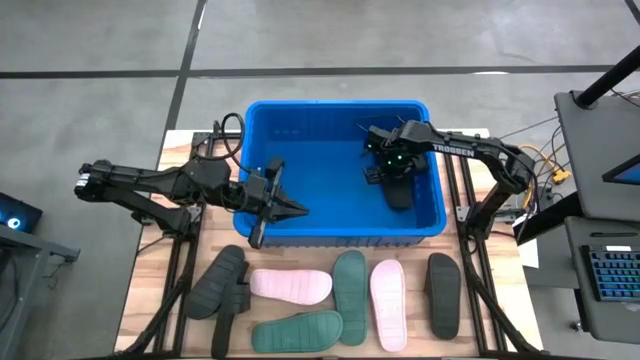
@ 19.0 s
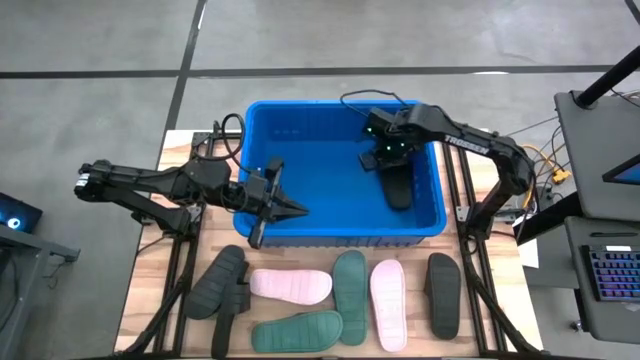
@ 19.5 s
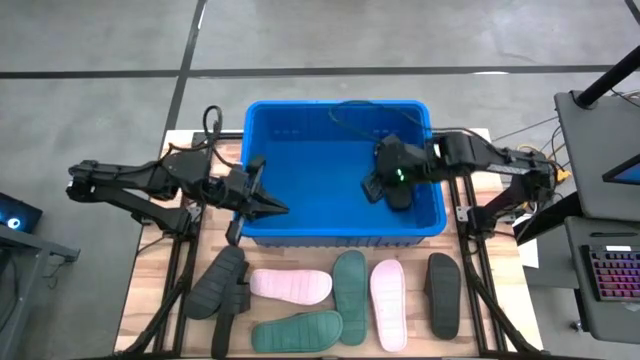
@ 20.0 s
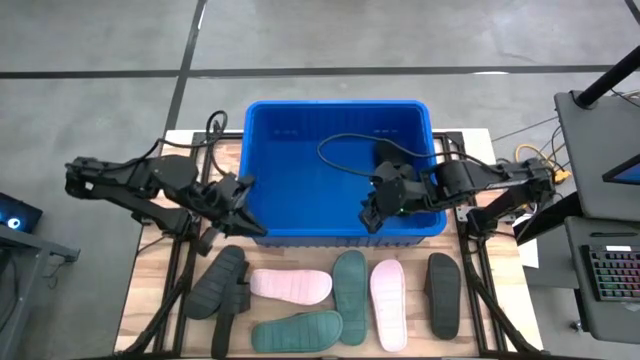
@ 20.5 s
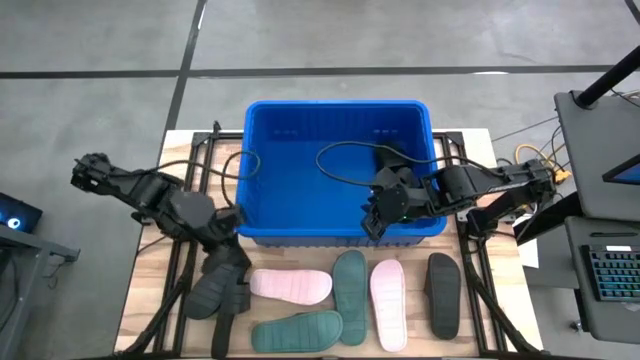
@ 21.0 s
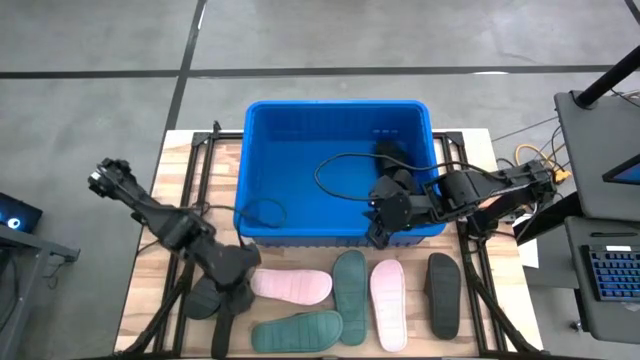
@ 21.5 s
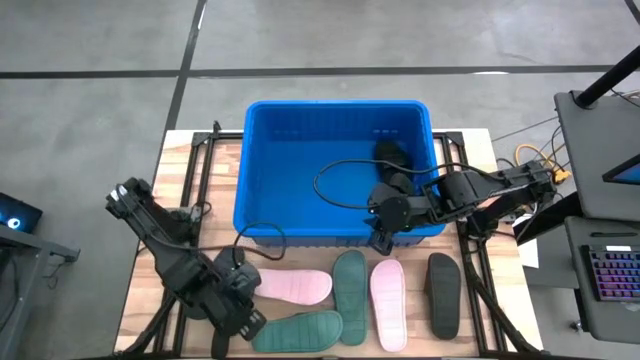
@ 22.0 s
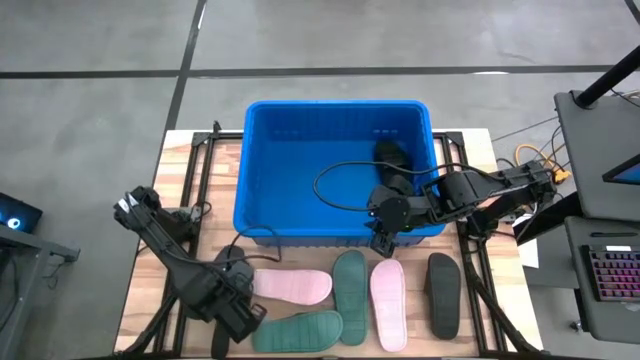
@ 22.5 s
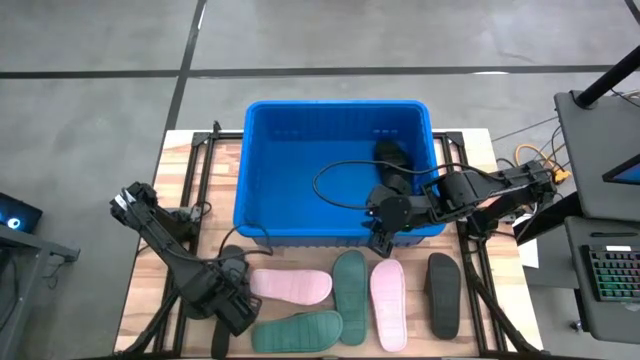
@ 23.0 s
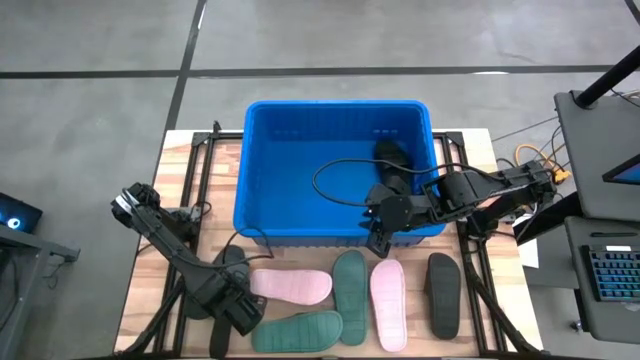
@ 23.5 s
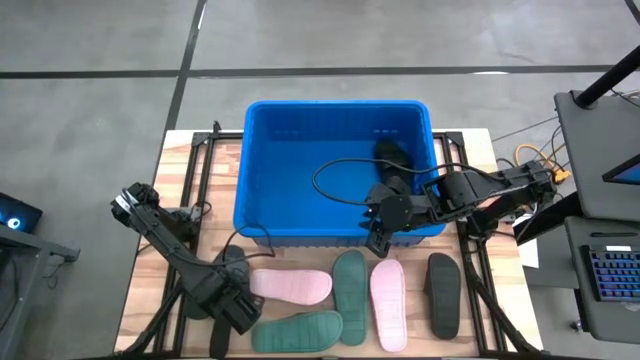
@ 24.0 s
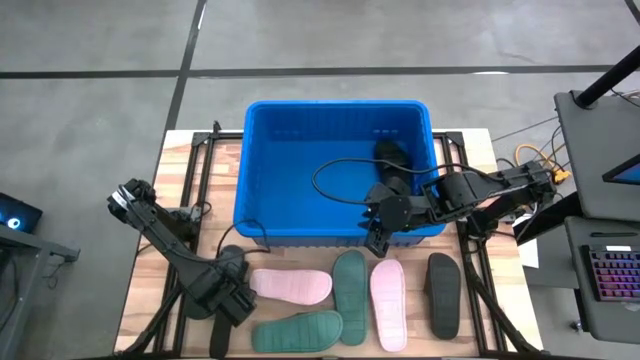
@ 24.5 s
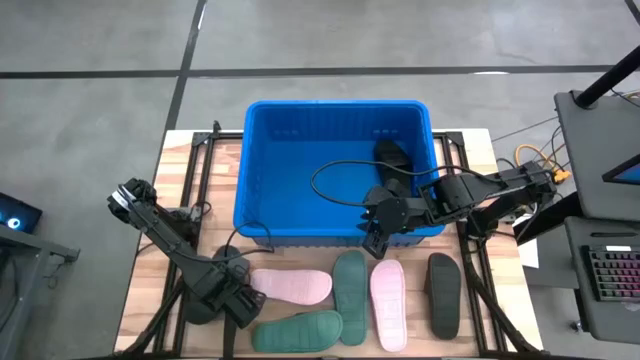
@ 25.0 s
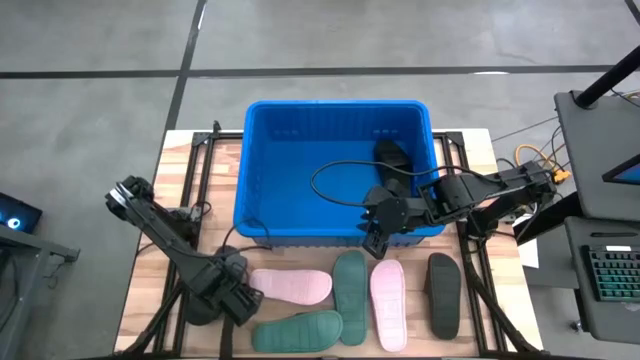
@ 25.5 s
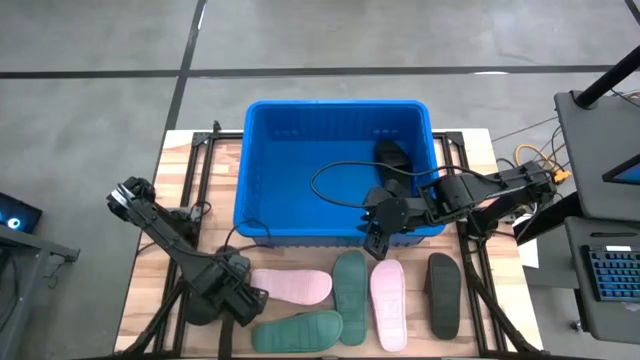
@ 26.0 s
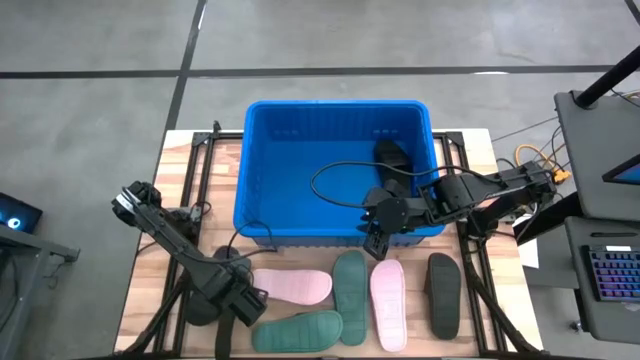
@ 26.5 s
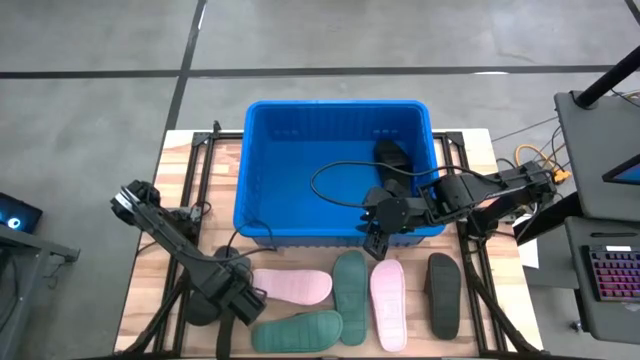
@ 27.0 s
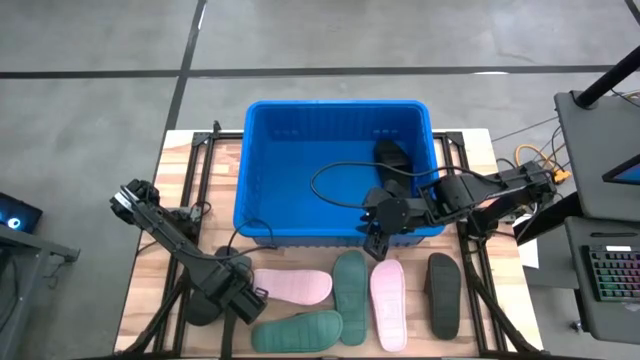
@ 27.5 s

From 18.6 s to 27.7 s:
Task: Pick and place slides into bin
Put the black slide into the bin

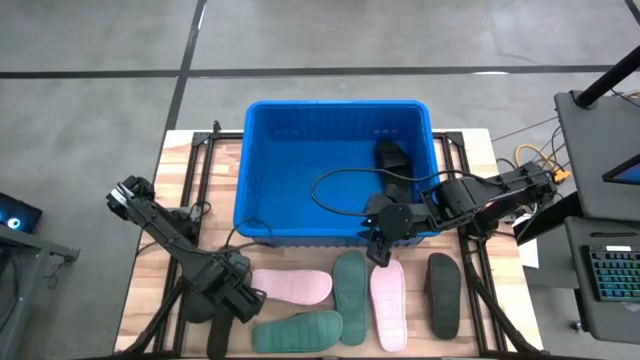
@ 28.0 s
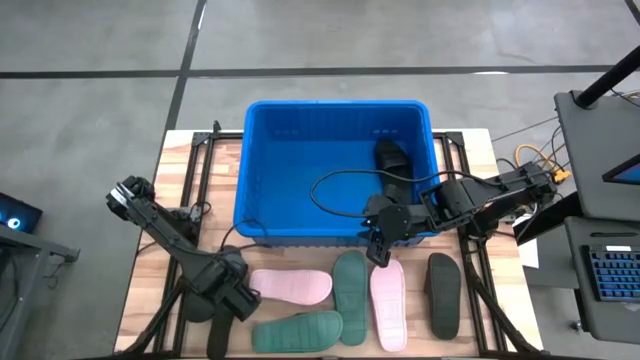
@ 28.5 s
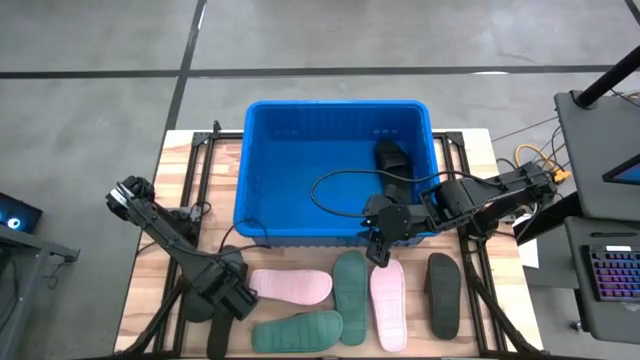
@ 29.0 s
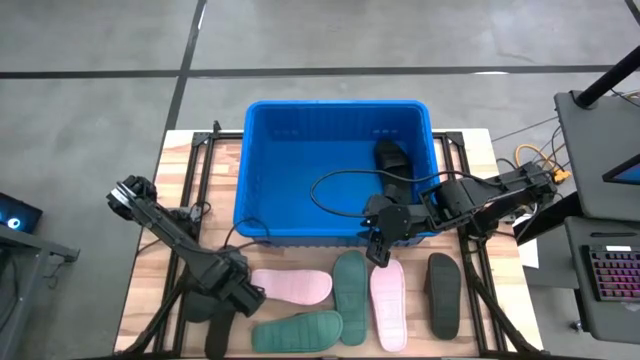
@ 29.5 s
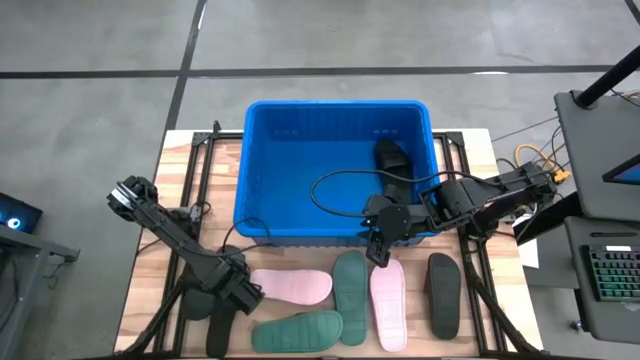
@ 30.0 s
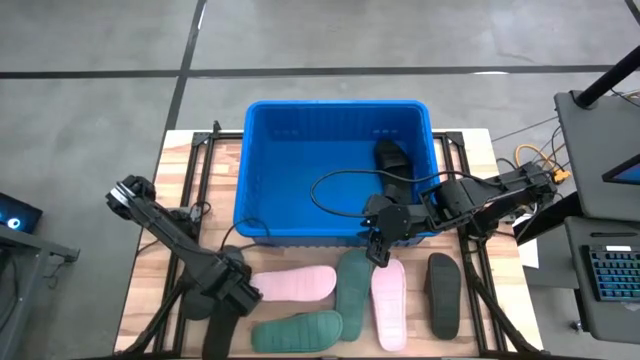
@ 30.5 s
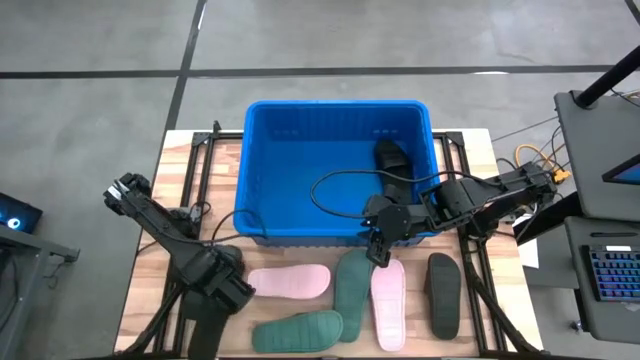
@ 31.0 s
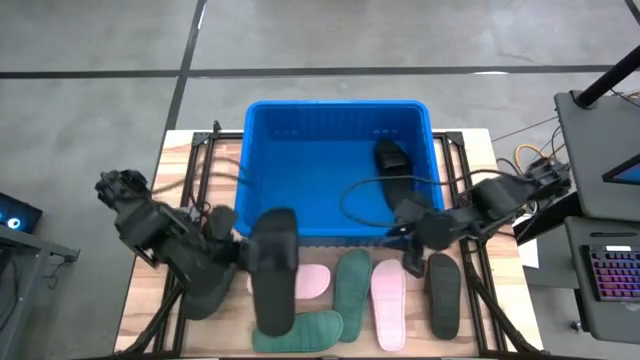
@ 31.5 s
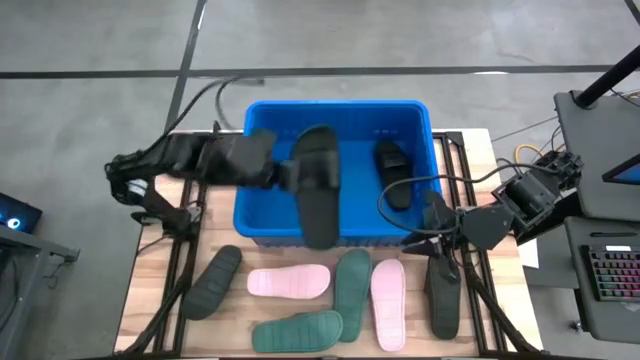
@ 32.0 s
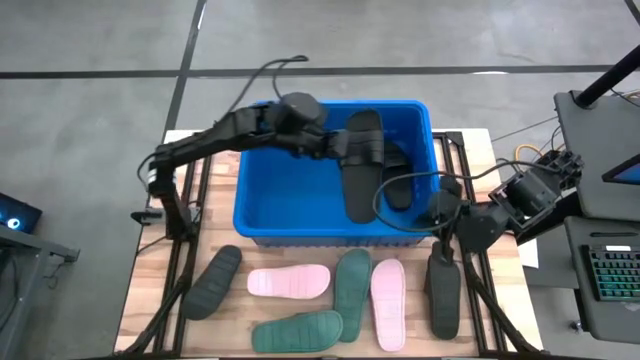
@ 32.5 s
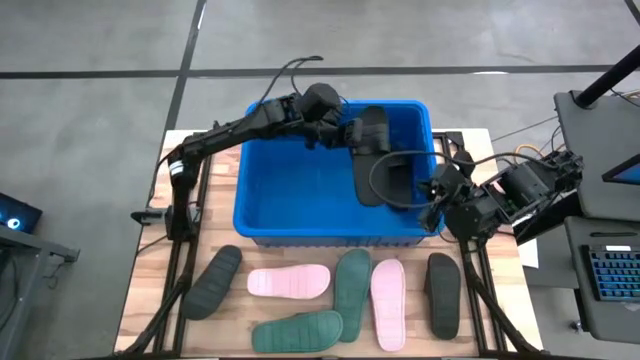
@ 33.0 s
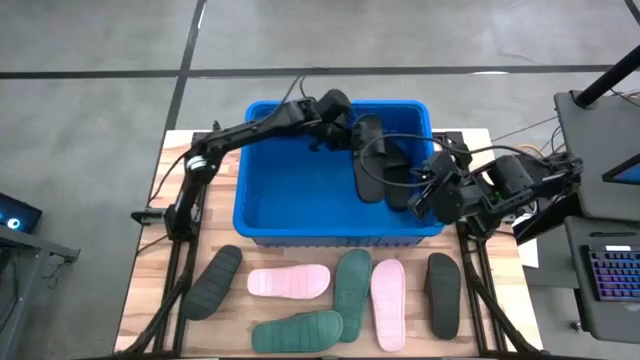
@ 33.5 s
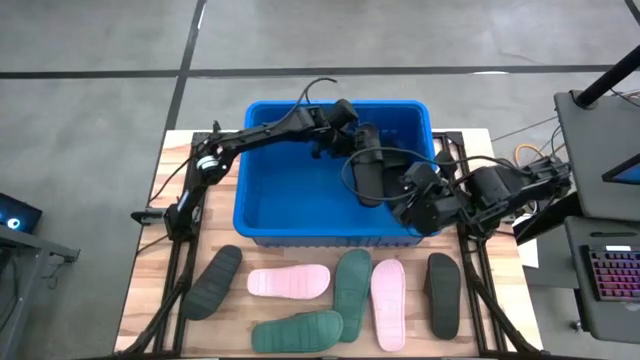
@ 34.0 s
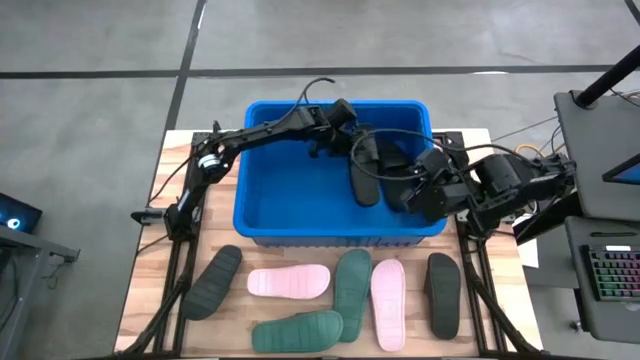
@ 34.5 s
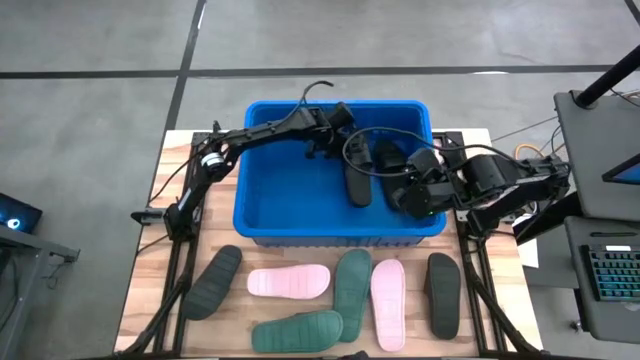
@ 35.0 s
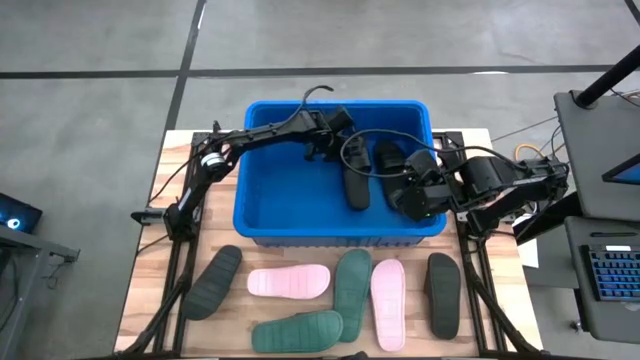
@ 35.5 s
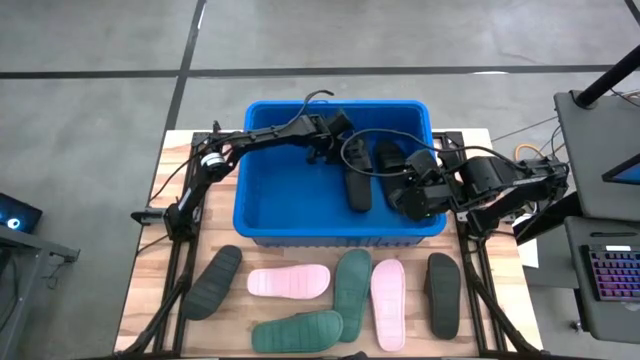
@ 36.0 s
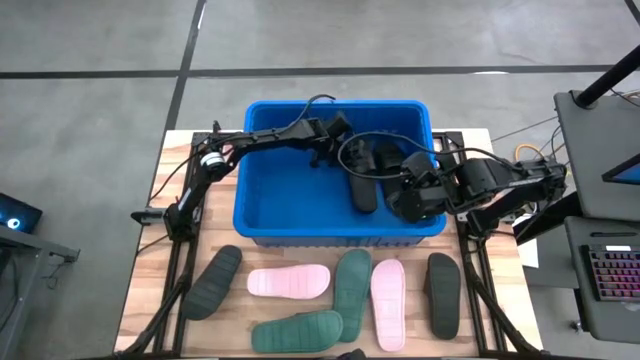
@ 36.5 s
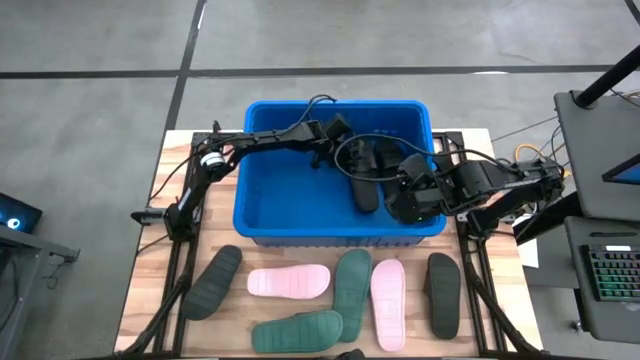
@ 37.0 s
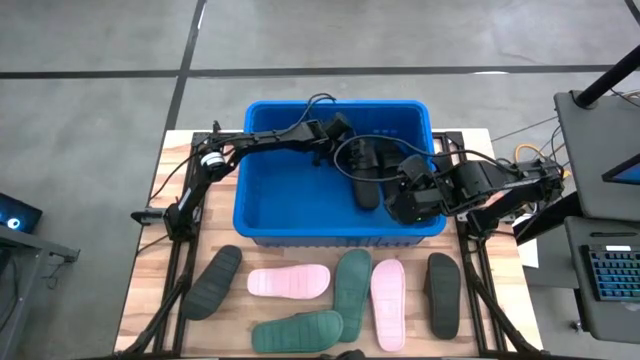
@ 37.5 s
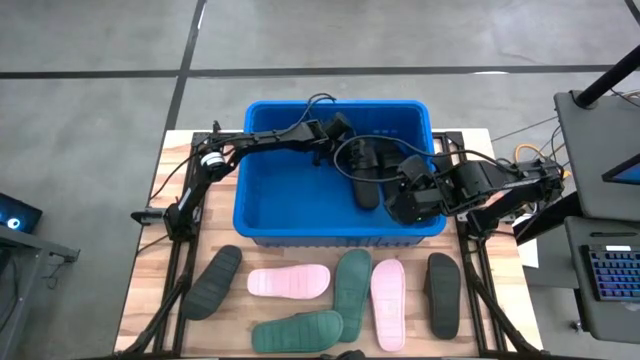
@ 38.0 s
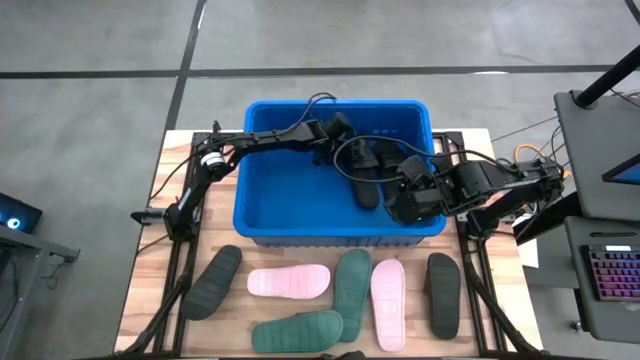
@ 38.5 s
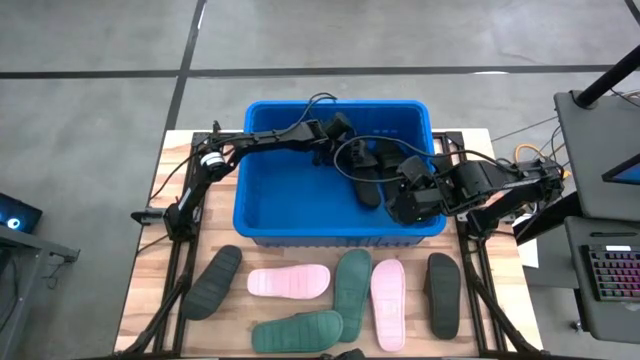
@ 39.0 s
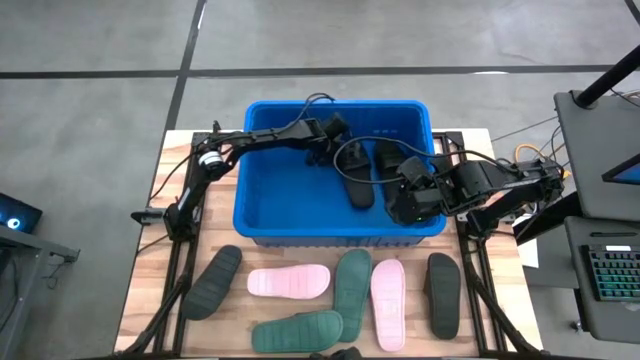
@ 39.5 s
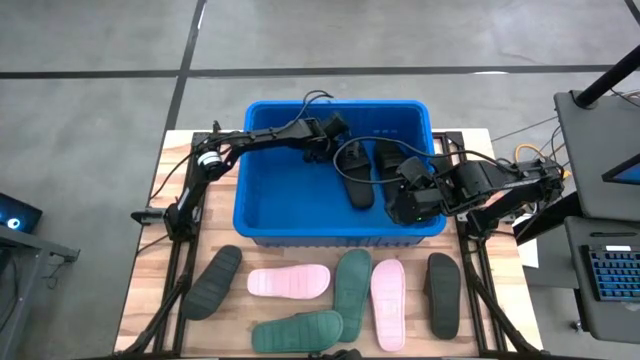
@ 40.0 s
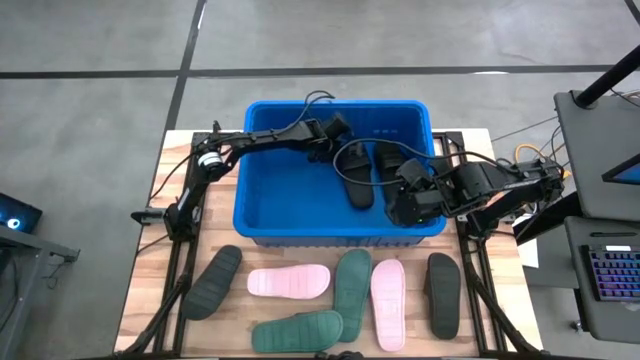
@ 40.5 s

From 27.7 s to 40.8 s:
Put the black slide into the bin
